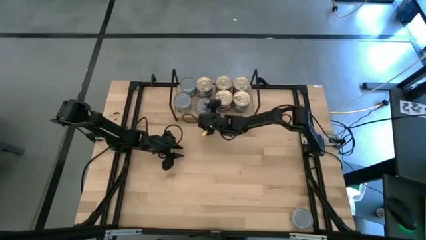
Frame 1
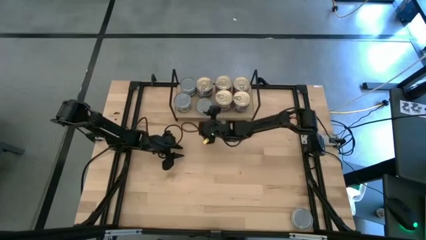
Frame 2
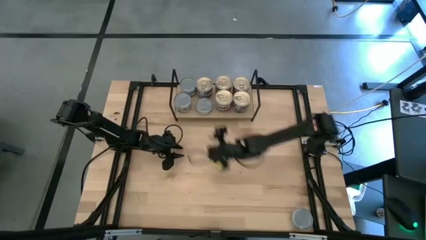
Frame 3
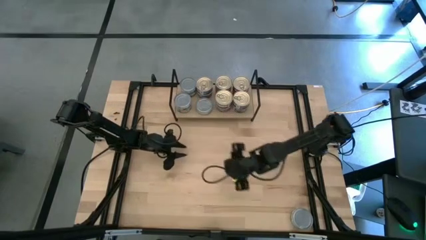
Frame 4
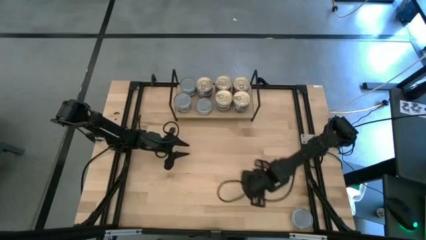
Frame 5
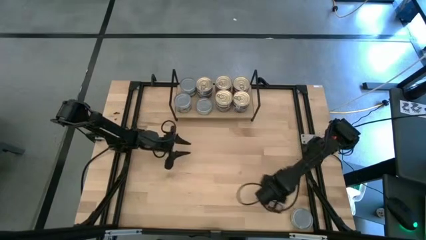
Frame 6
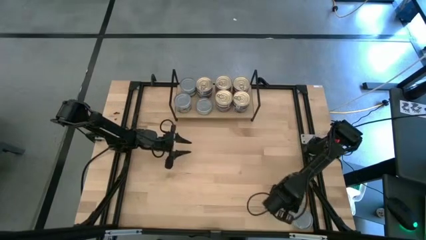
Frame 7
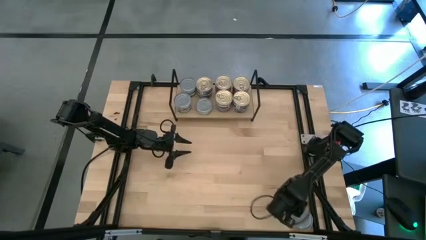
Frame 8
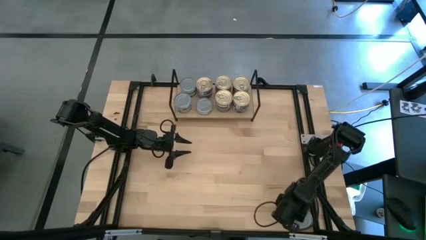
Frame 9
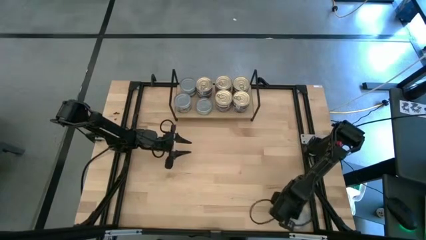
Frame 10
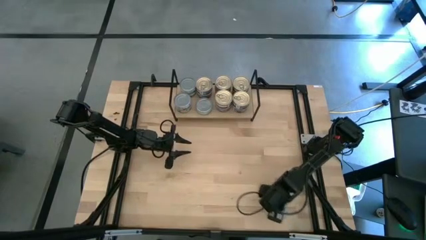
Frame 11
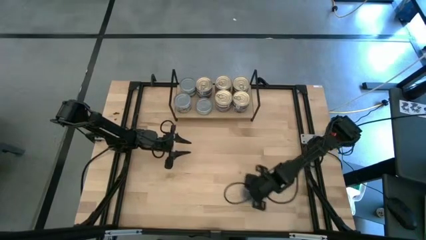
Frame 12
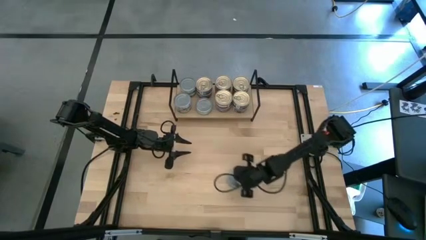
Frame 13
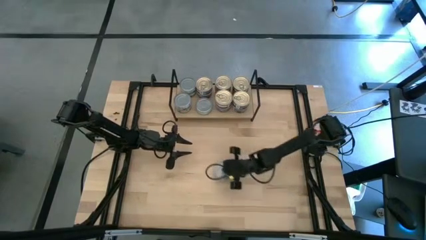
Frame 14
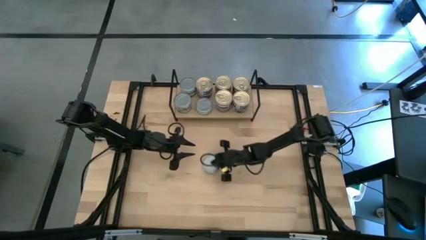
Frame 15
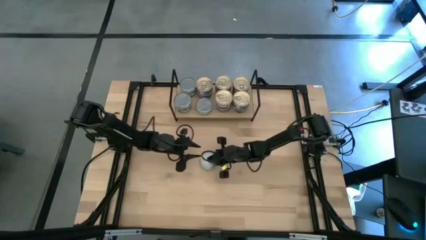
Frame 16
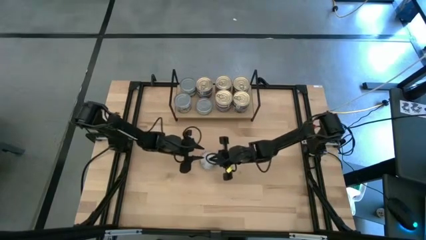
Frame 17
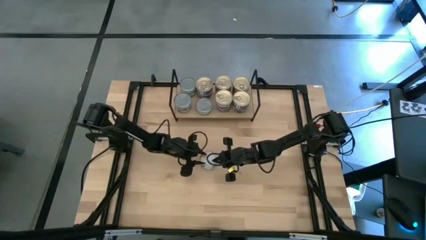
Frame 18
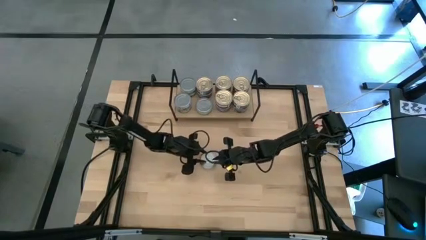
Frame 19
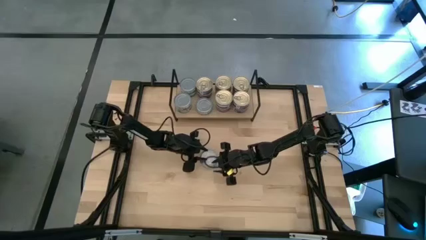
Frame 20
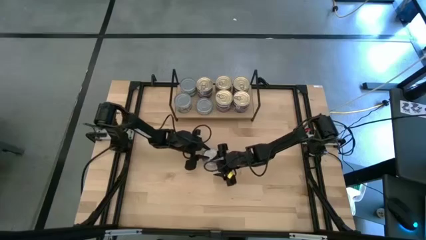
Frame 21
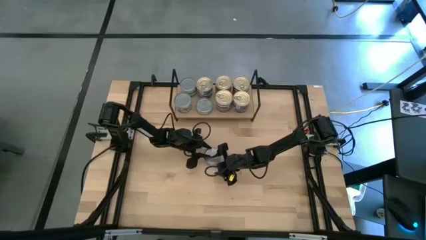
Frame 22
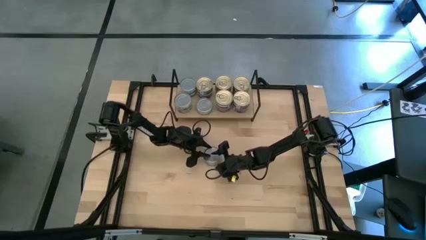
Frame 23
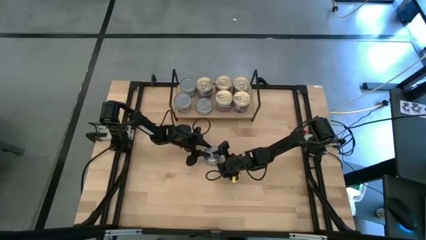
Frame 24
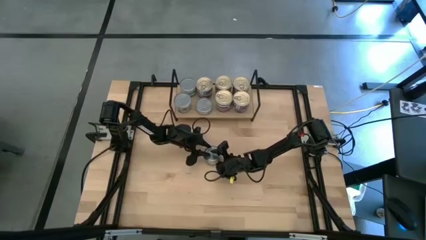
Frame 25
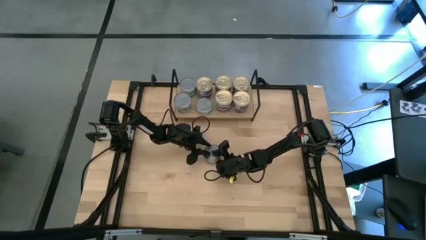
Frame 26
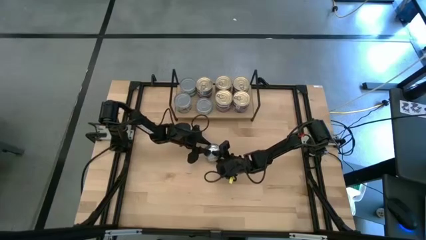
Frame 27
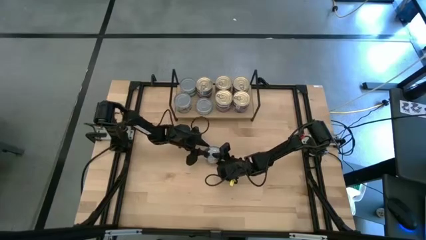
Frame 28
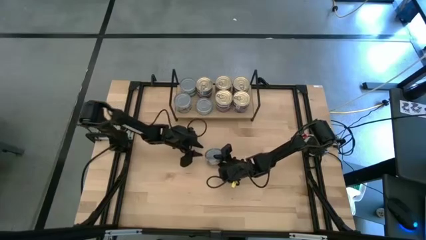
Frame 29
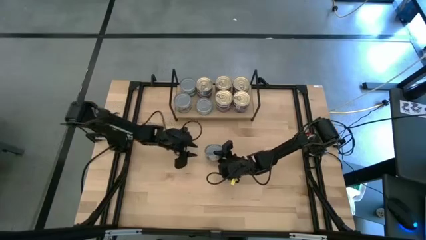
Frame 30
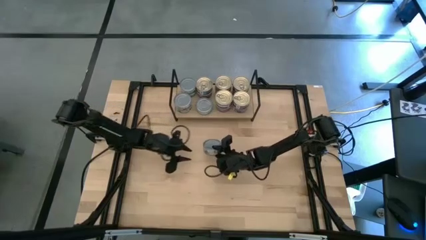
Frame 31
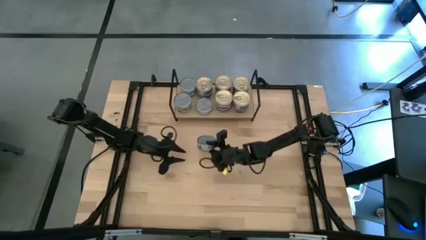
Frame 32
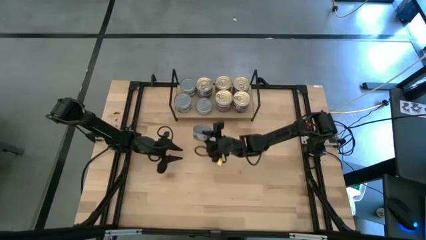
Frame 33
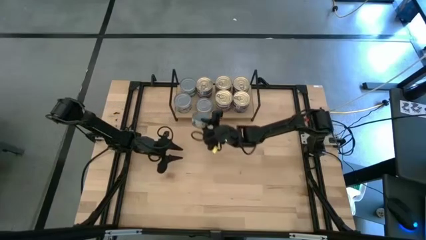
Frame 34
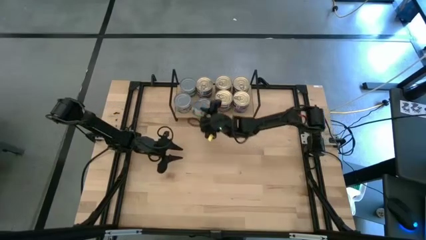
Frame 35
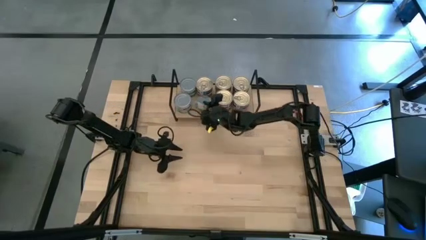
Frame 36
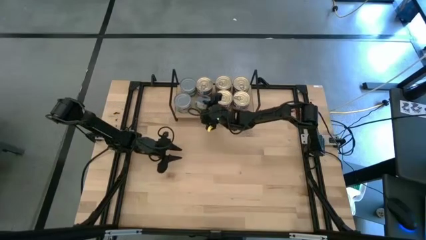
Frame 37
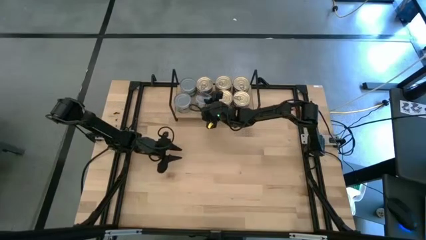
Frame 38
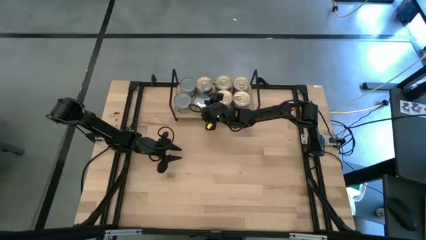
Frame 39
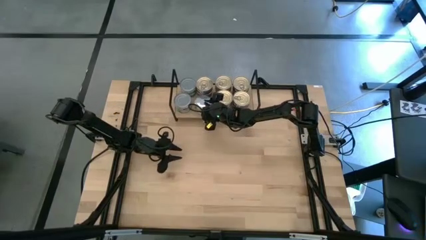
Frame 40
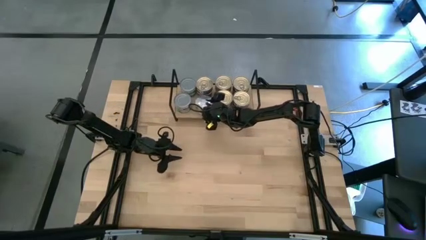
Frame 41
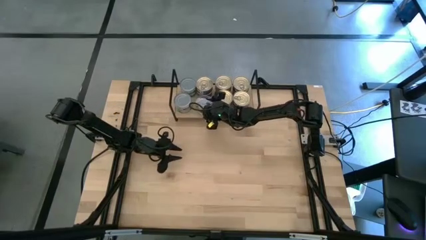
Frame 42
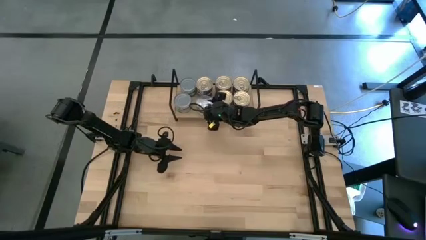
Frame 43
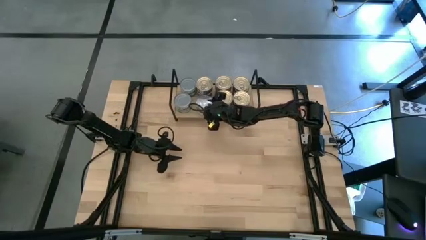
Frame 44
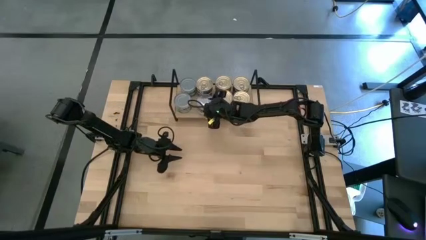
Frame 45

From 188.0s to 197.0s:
Task: Stack canned seafood by type on shelf
Stack the green and white tuna can on top of the green and white tuna can on the shelf

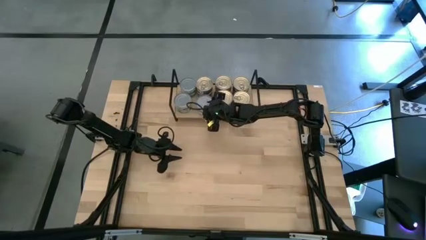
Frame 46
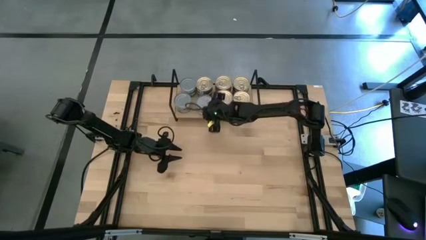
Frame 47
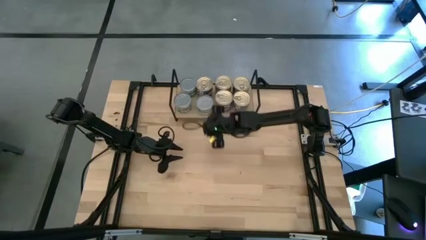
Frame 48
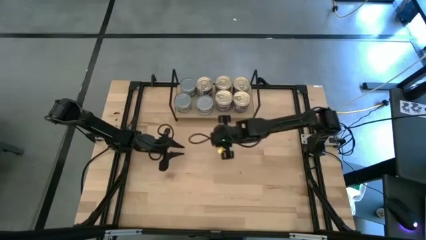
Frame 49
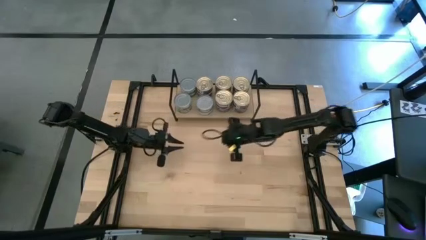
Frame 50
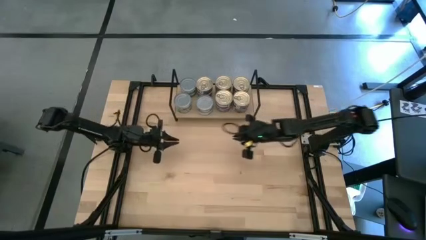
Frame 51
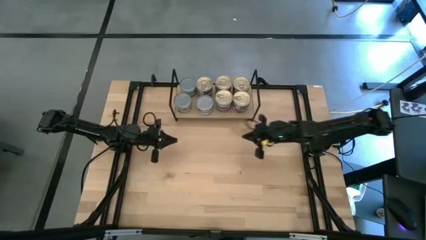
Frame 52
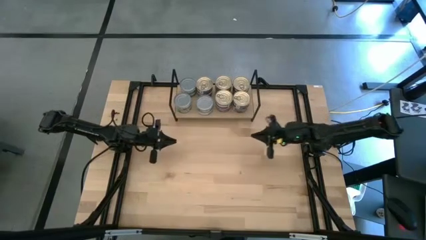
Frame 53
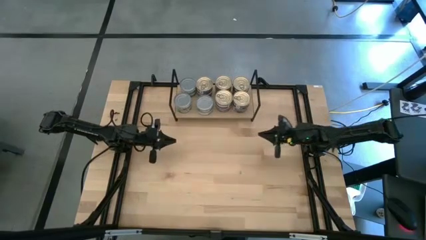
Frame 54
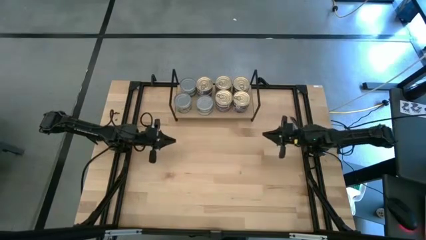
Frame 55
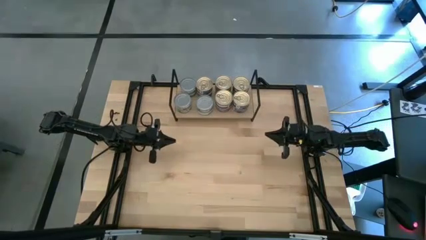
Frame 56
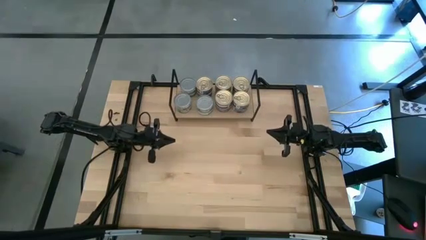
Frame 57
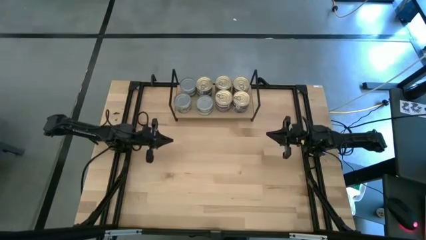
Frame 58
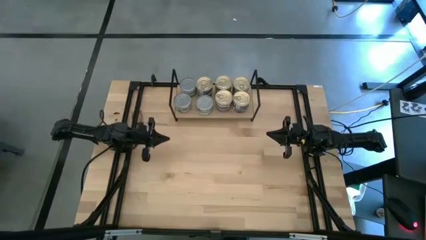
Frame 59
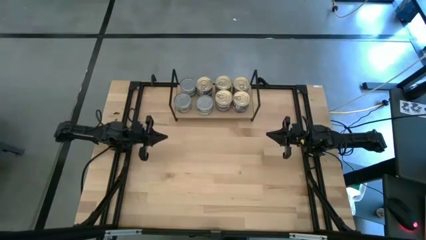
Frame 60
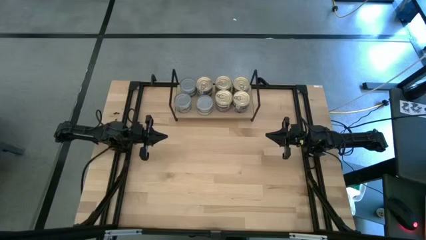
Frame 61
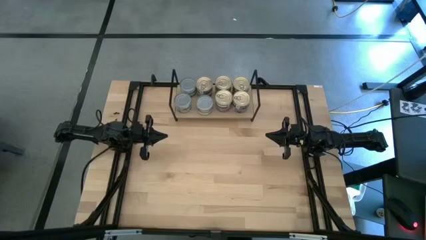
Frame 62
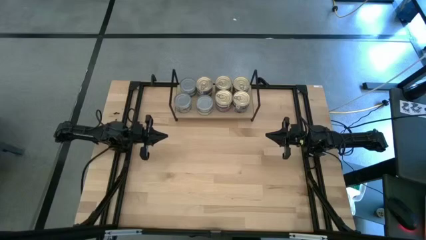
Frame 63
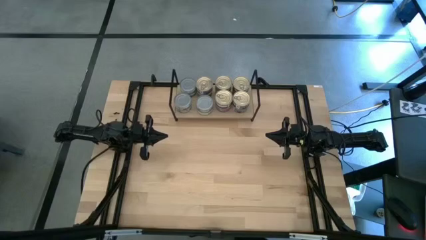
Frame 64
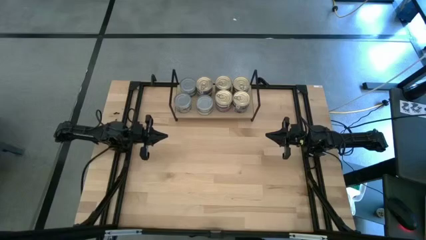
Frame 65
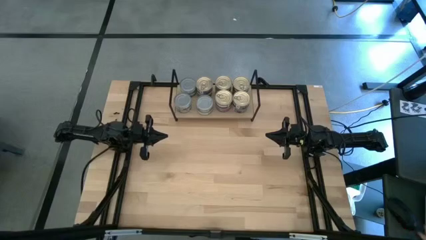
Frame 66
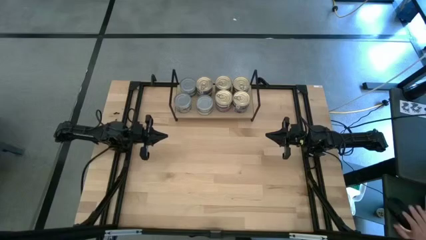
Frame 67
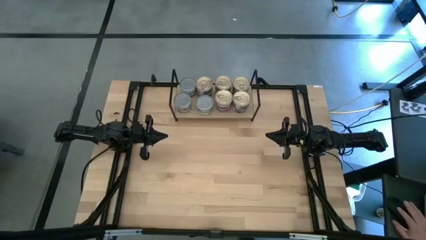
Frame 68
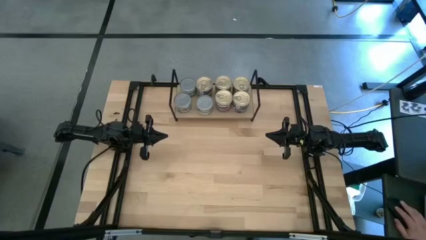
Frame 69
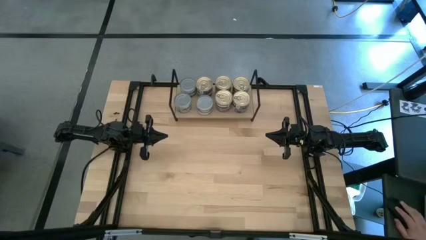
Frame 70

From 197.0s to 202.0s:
Return to Home Position

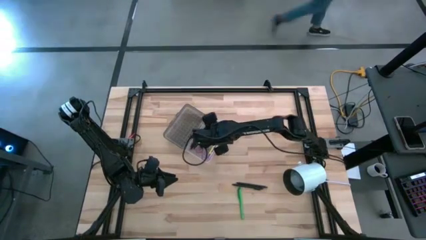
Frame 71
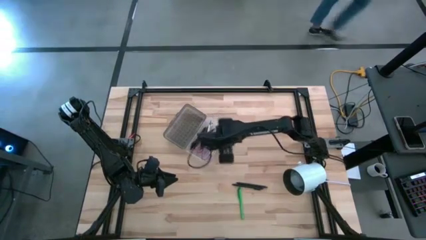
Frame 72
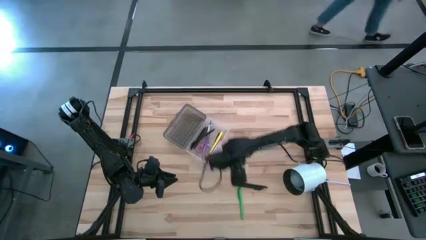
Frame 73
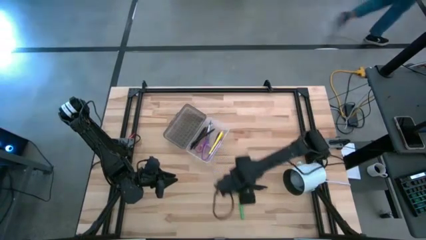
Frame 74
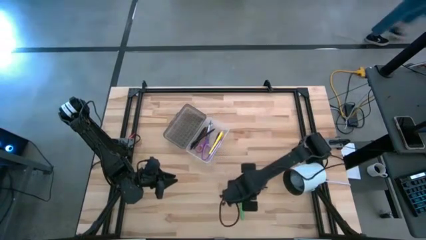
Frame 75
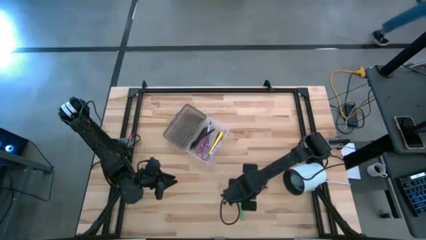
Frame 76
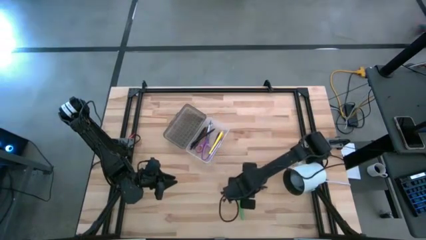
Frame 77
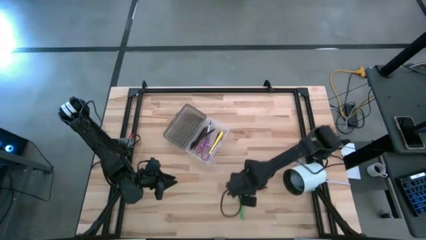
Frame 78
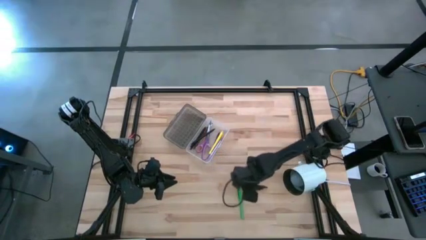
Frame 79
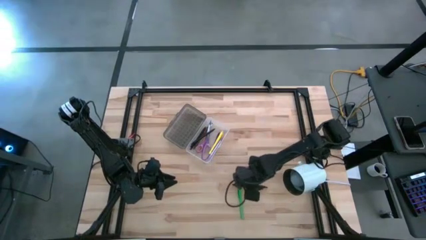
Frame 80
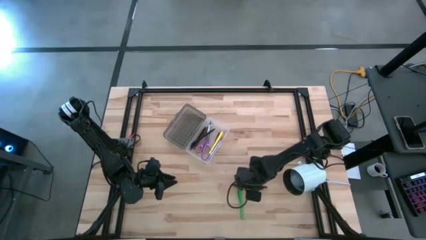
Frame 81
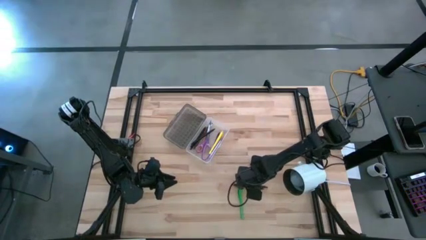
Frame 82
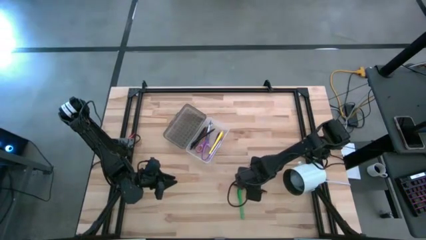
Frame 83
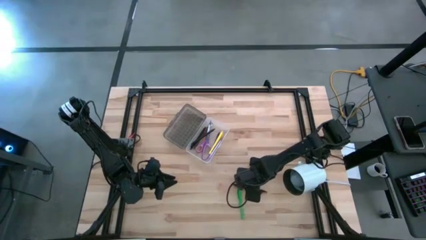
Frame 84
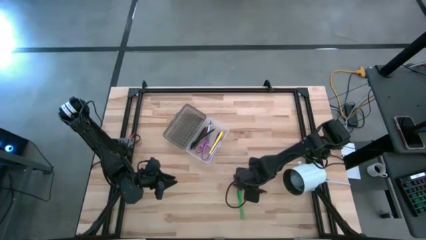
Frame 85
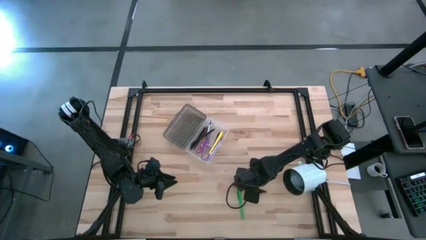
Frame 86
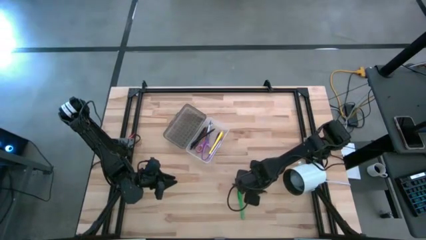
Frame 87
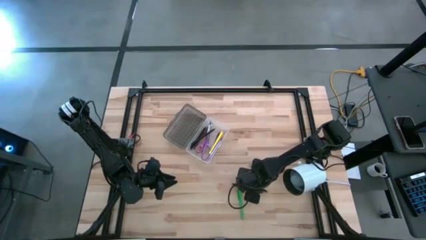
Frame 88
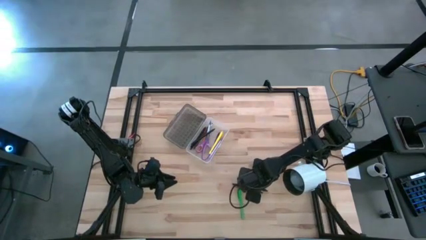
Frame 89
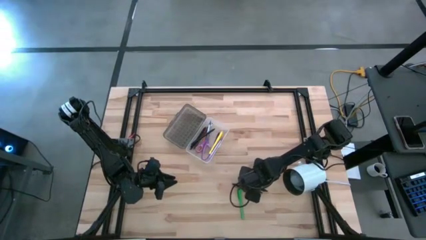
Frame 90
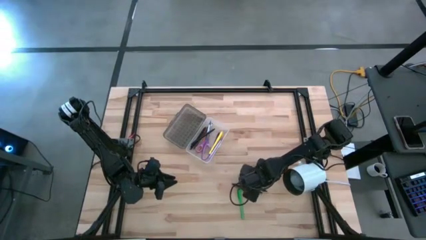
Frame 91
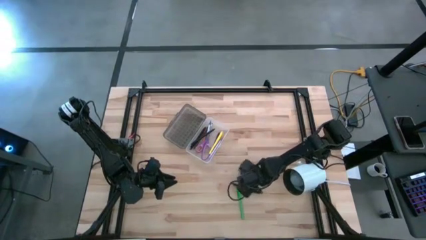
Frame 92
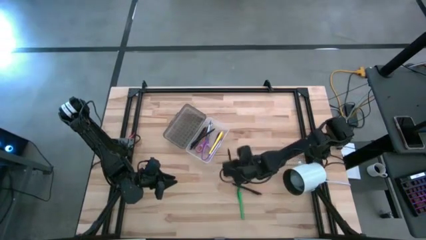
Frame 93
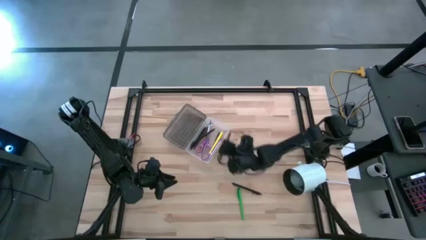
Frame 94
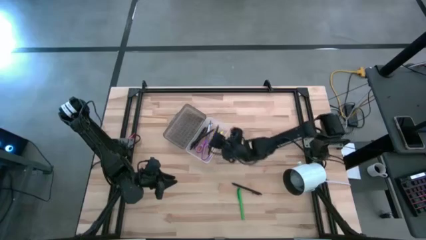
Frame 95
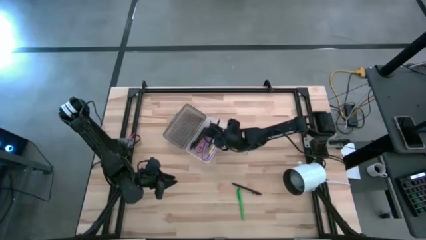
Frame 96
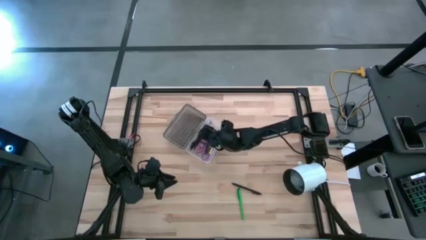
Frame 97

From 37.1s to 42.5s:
Task: Pick & place school supplies into a supply box
Put the black pen into the black supply box
